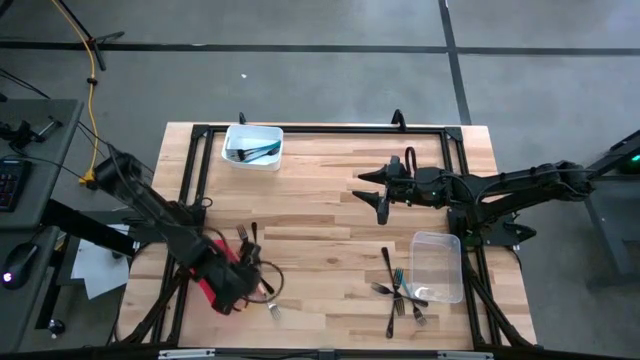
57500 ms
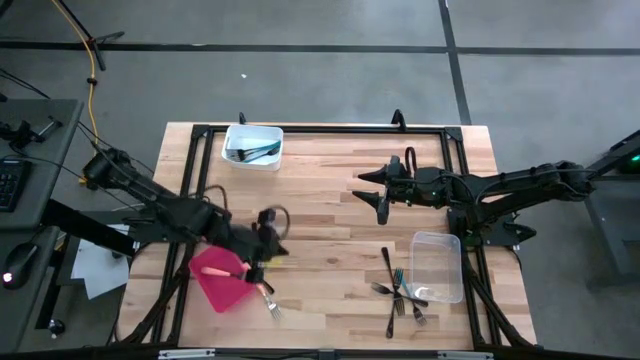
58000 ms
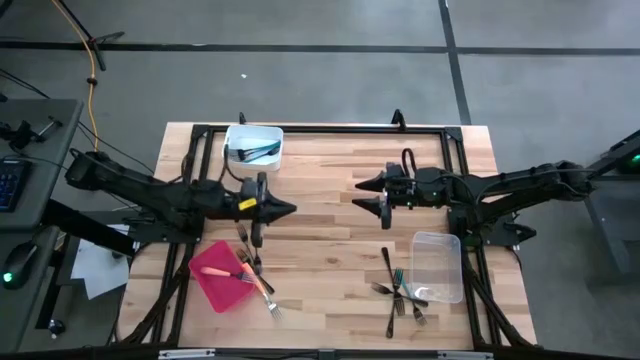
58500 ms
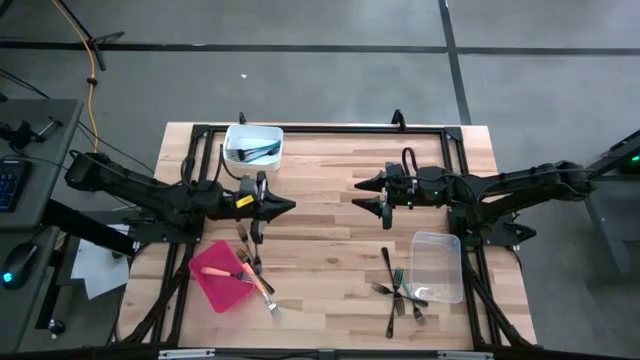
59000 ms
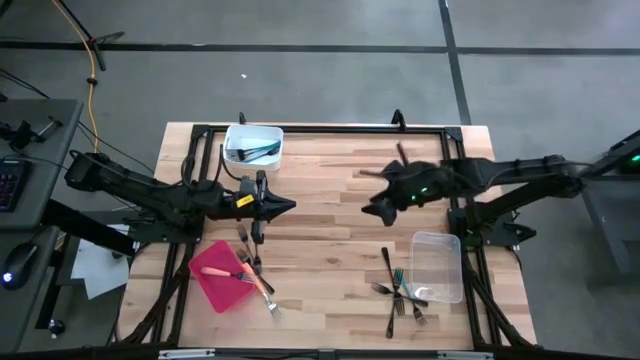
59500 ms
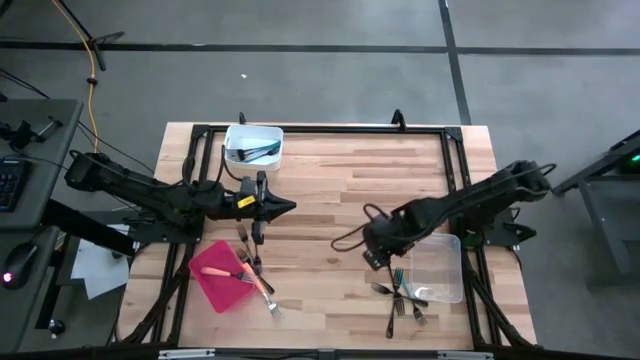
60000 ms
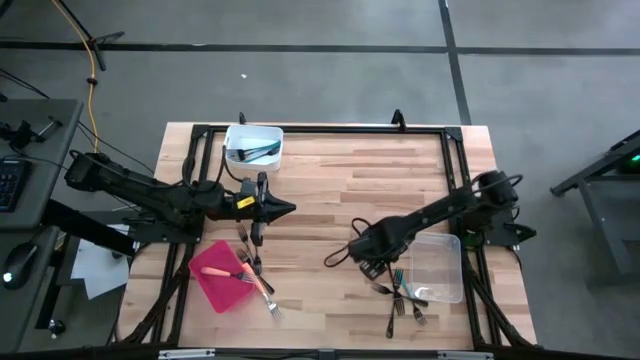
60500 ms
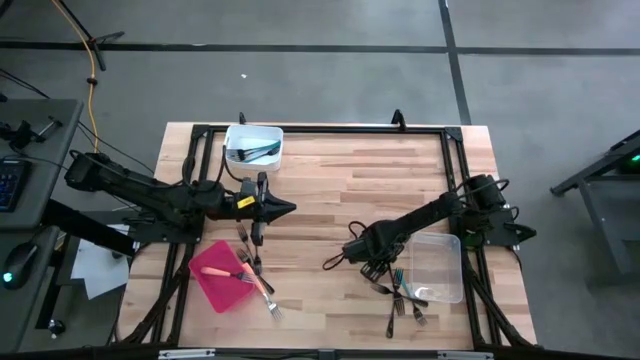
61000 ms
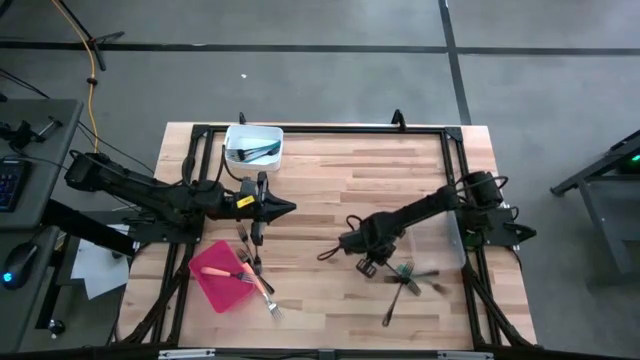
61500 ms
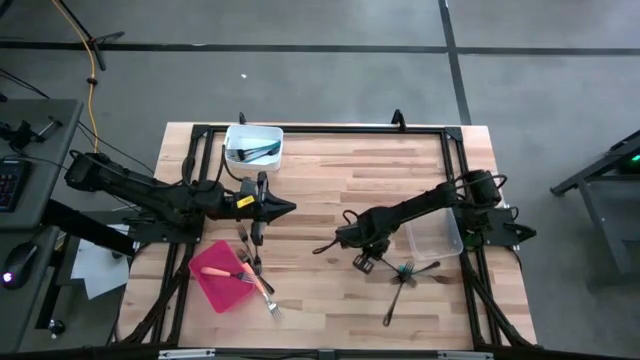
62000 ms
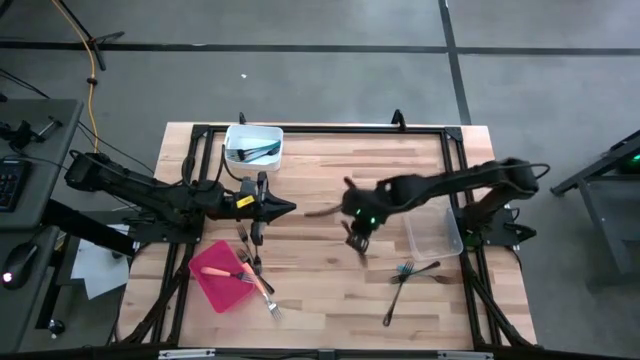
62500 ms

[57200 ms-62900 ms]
Task: Sort silverware by color (type)
Put the black fork into the transparent bin

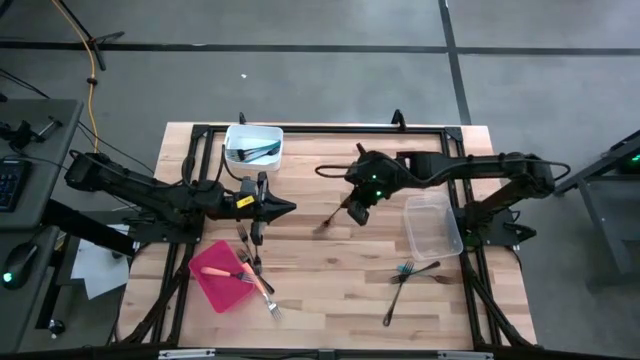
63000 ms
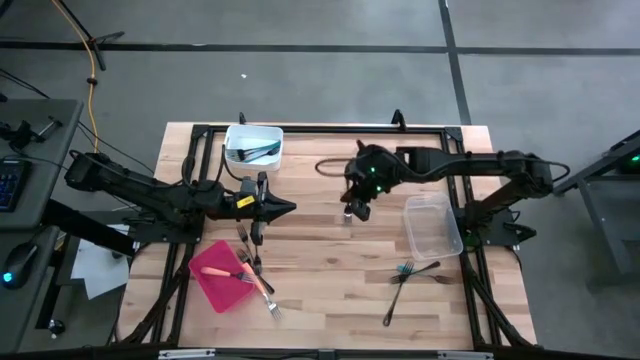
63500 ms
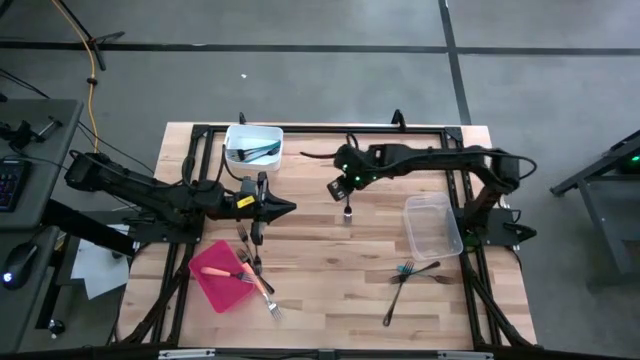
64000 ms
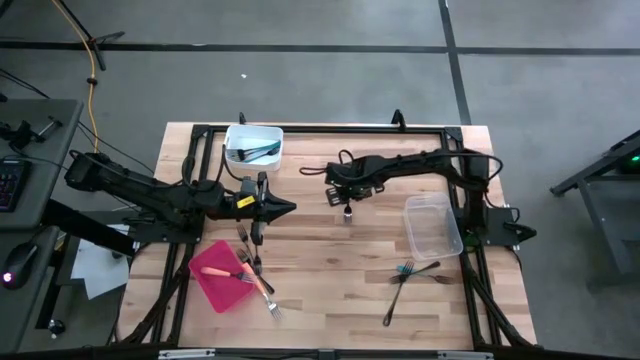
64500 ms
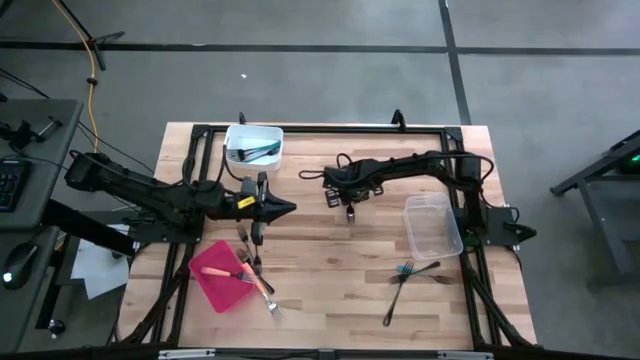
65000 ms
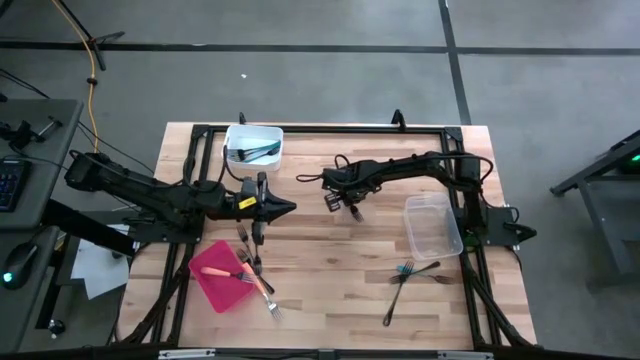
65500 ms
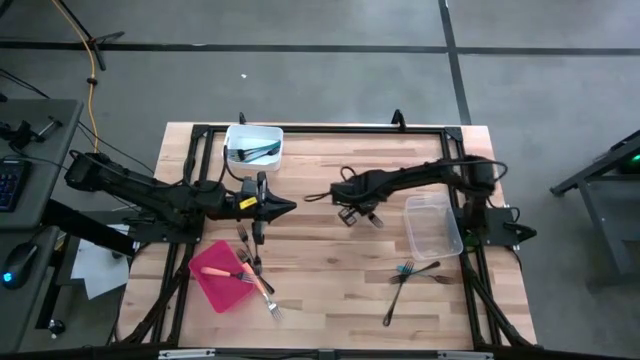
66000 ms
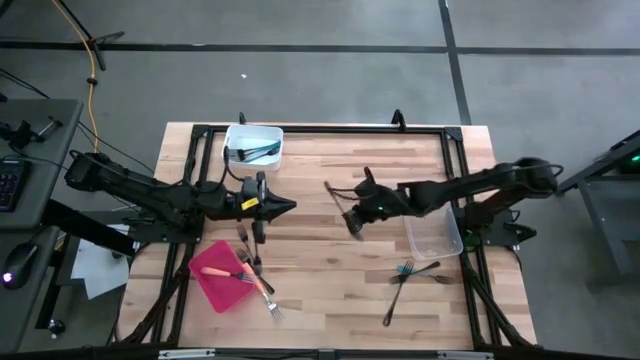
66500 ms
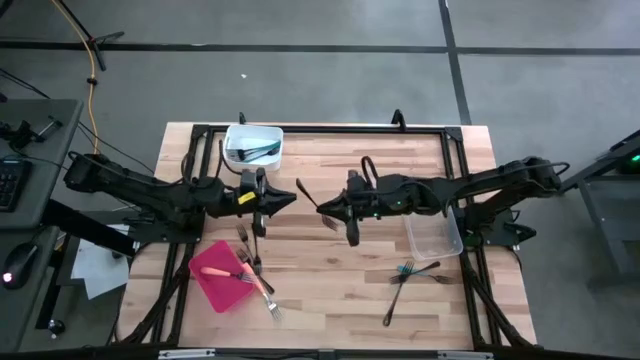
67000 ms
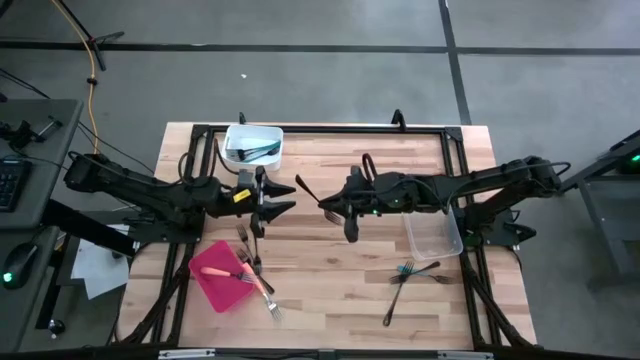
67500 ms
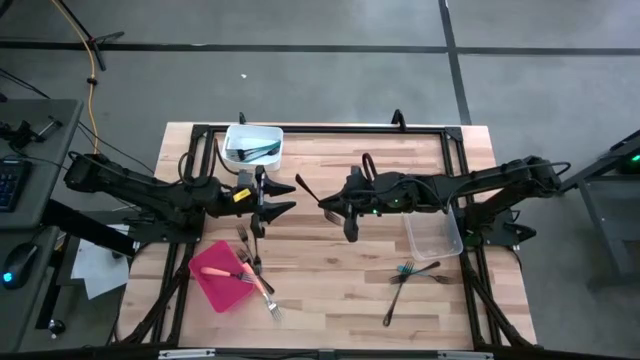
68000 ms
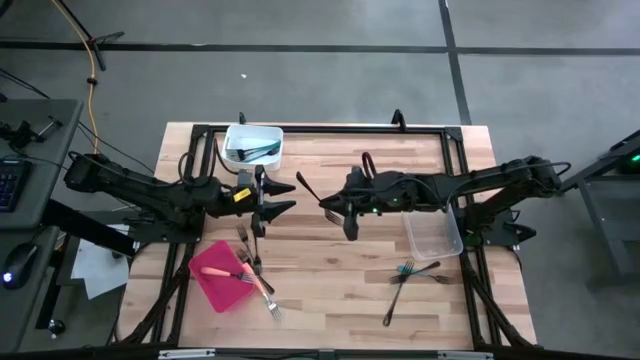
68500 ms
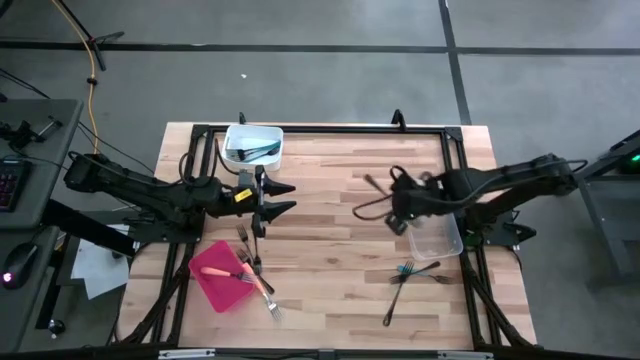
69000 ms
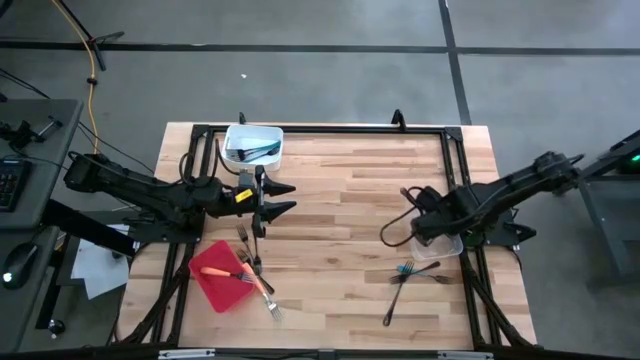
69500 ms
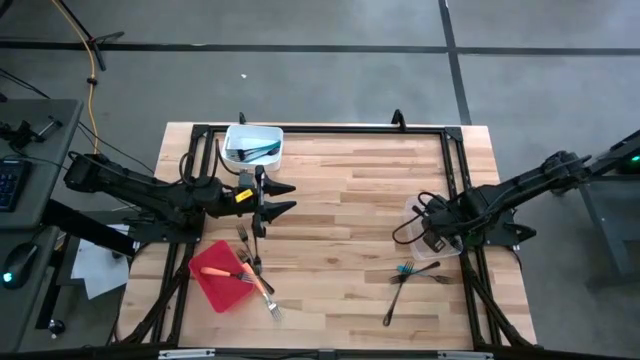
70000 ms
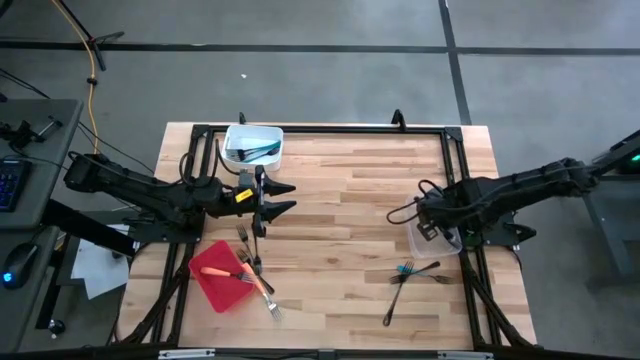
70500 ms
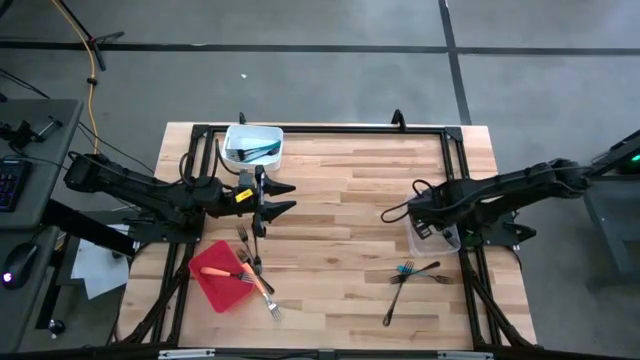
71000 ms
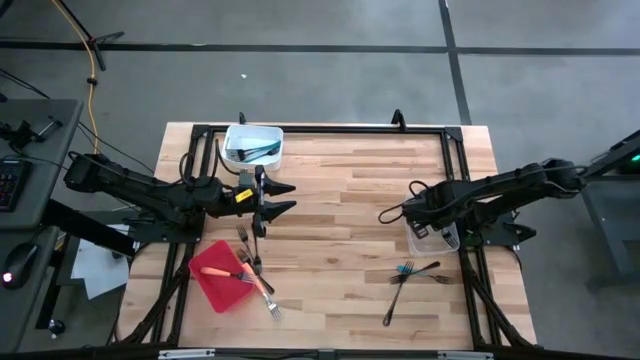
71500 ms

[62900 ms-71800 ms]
Put the black fork into the transparent bin

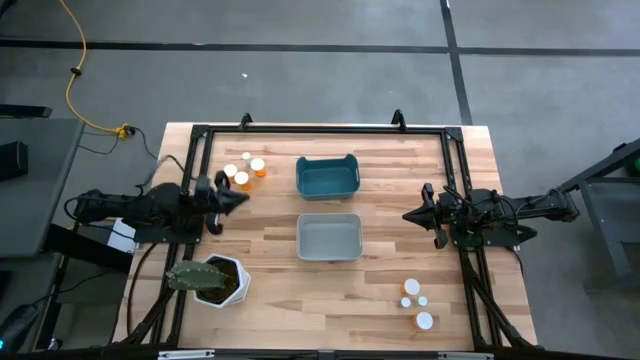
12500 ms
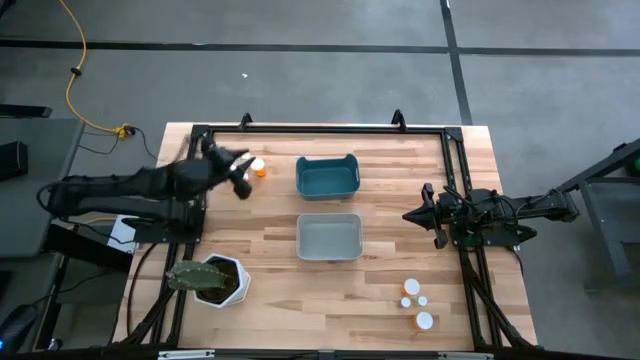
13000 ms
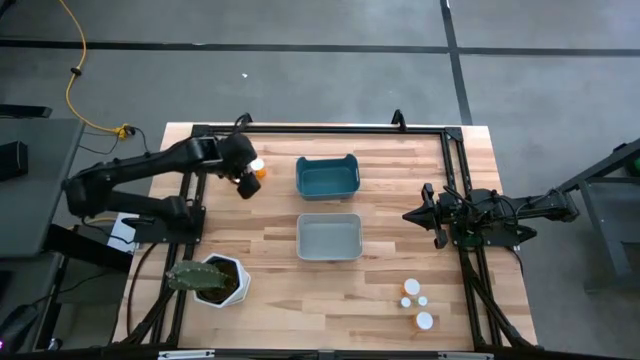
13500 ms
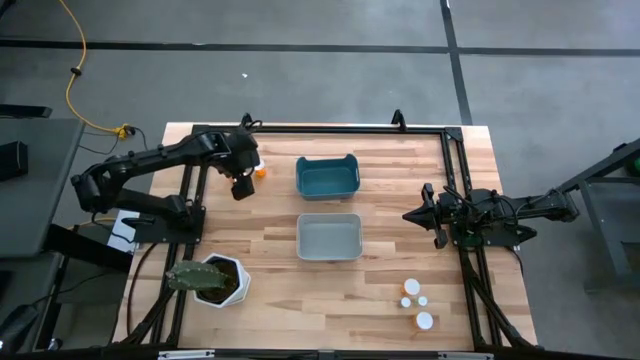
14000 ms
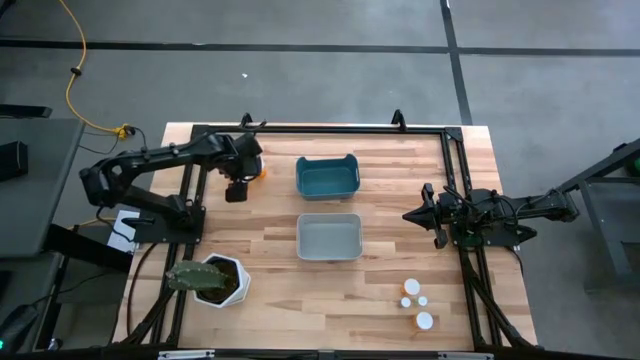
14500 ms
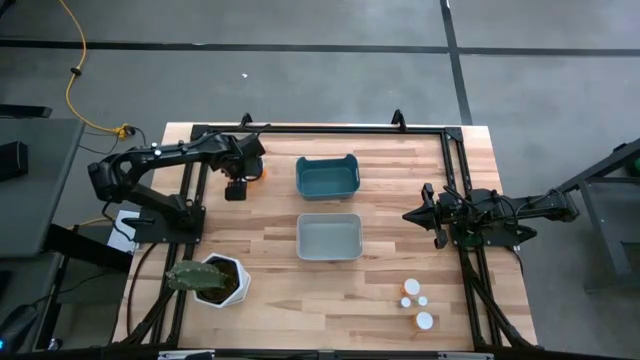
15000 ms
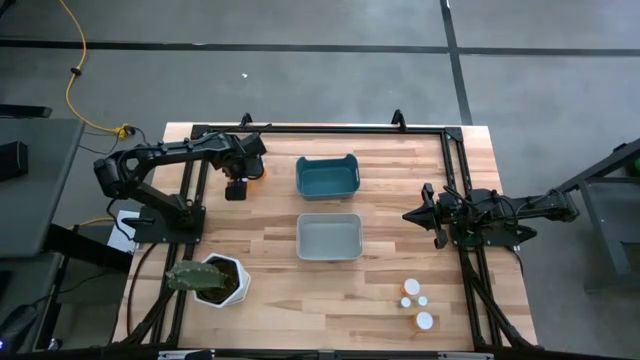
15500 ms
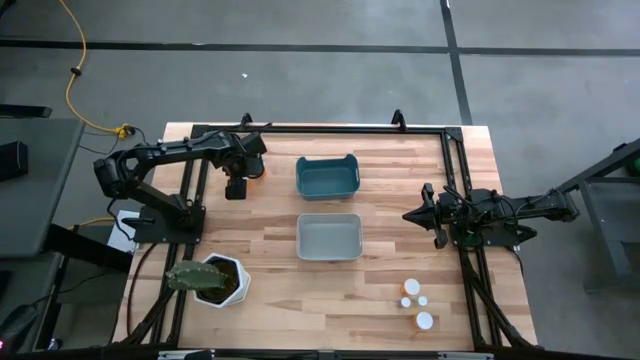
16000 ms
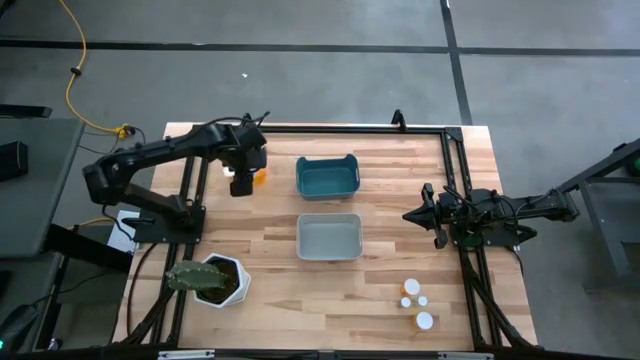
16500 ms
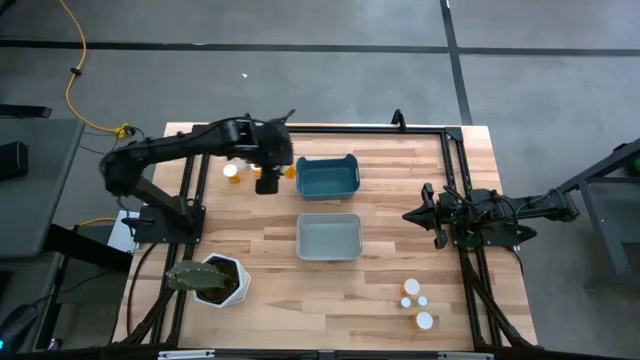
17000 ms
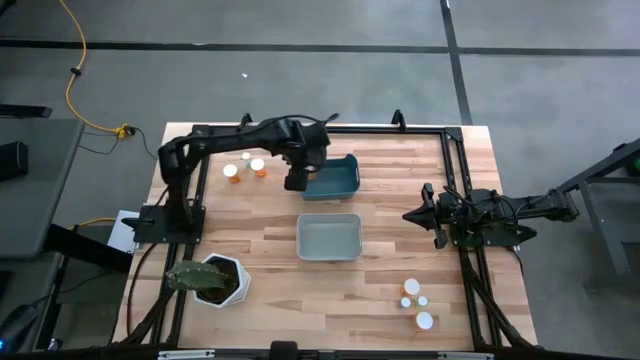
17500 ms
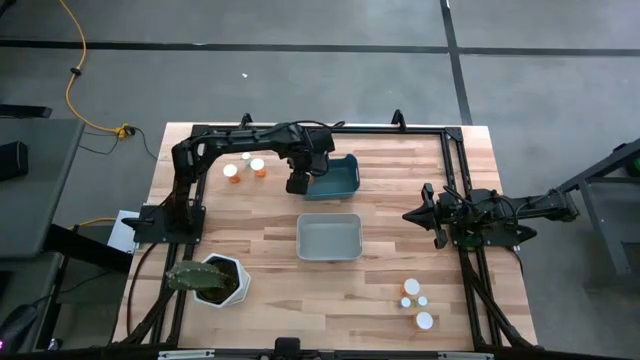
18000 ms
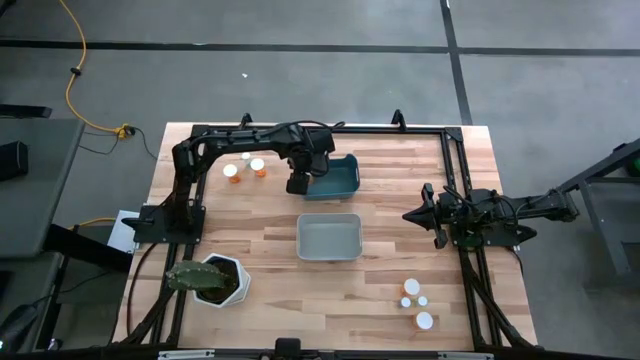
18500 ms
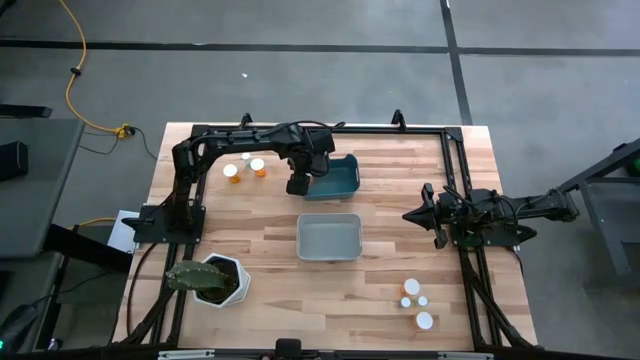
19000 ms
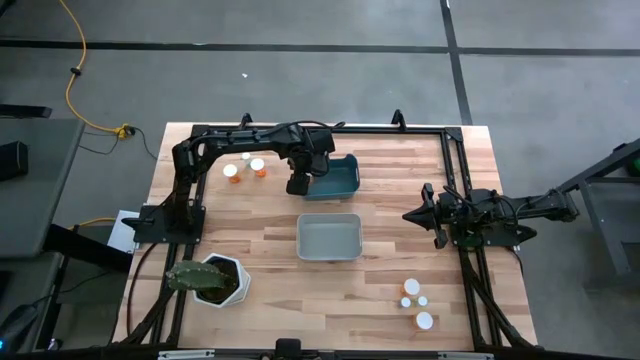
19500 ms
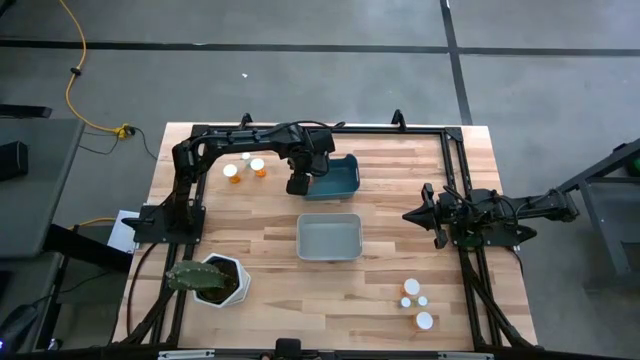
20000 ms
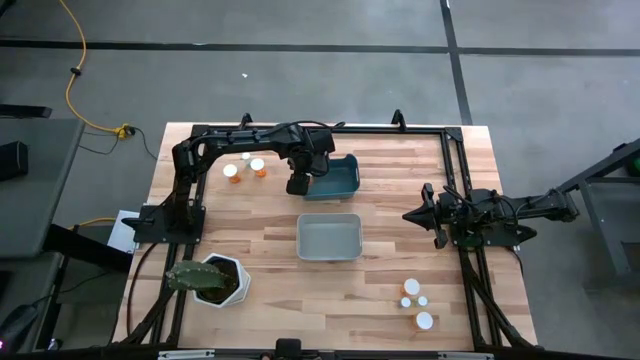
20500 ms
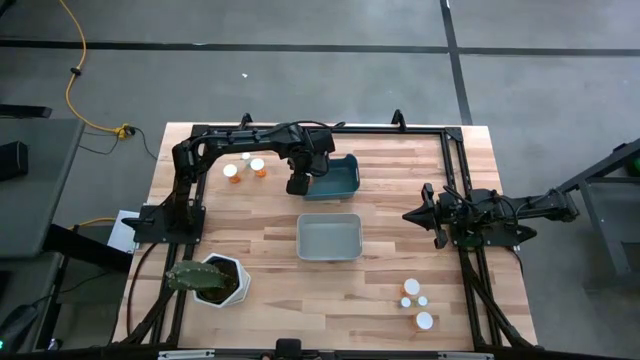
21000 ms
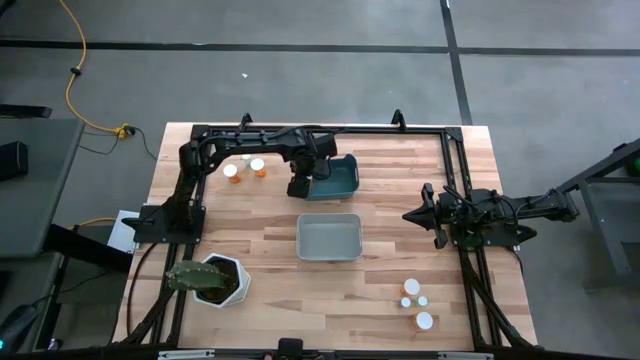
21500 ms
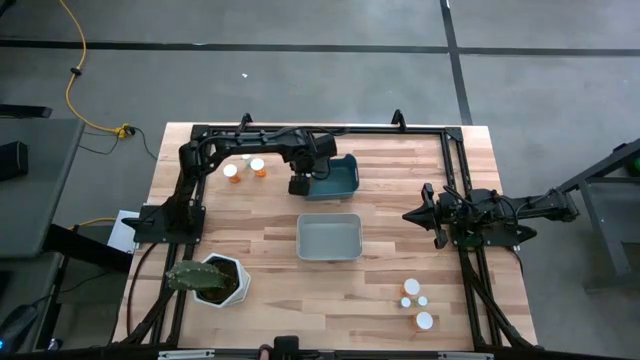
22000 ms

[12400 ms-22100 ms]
Task: Pick and place medicine bottles into bin by pill shape (circle, oval)
Put the orange capsule bottle into the blue bin
